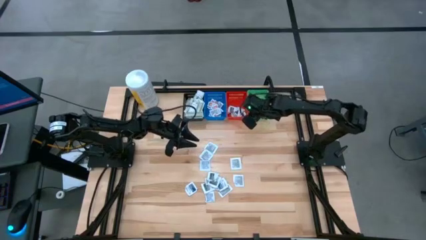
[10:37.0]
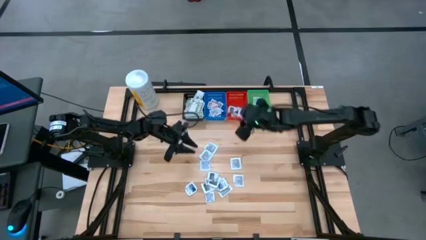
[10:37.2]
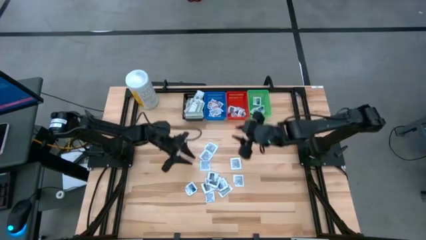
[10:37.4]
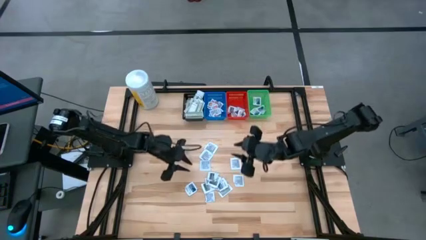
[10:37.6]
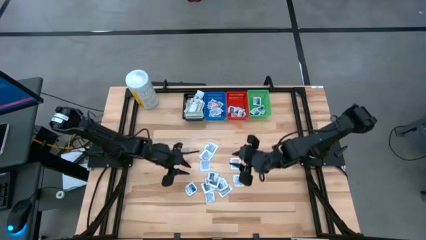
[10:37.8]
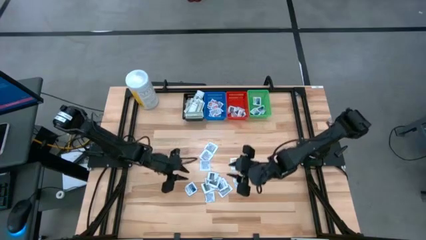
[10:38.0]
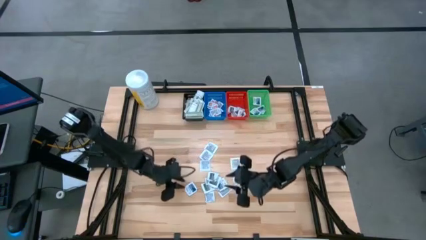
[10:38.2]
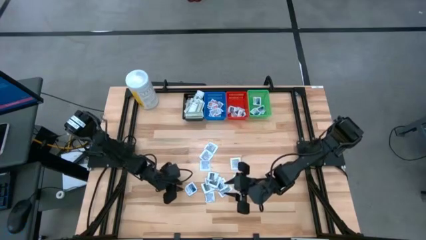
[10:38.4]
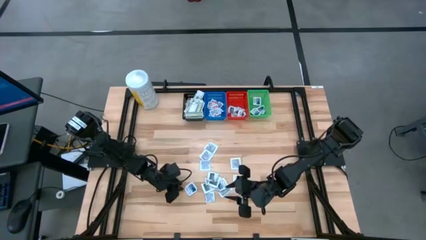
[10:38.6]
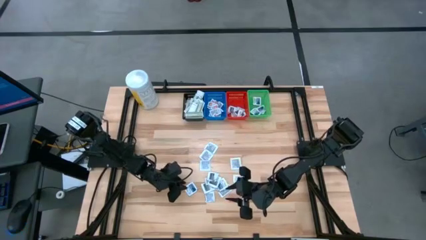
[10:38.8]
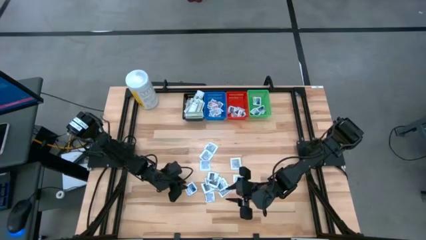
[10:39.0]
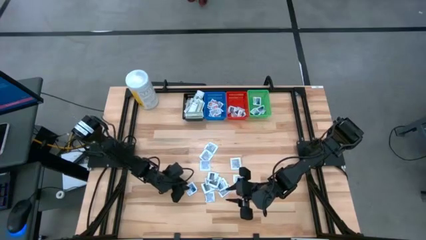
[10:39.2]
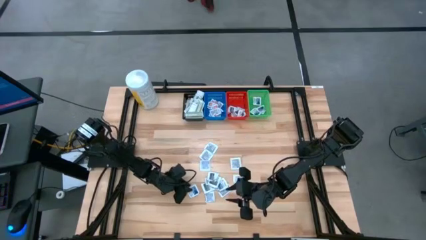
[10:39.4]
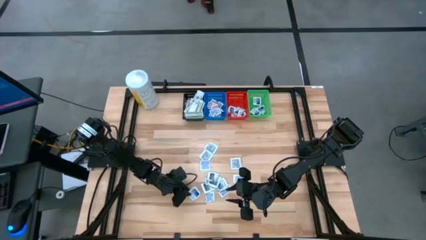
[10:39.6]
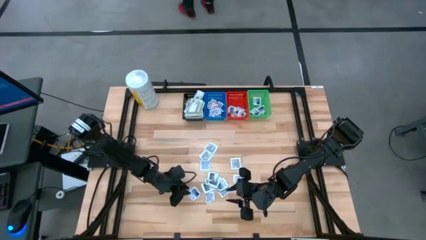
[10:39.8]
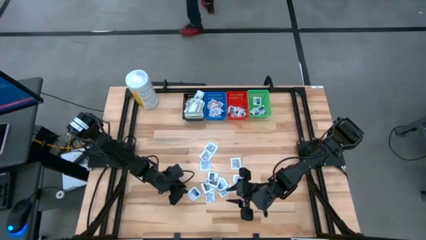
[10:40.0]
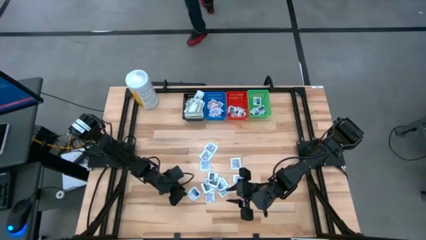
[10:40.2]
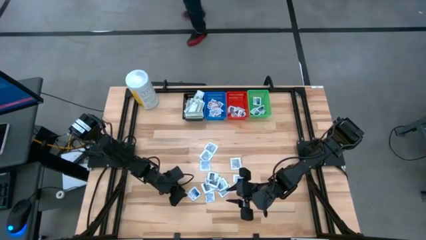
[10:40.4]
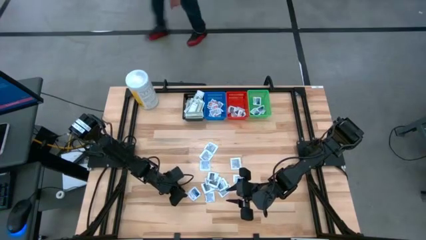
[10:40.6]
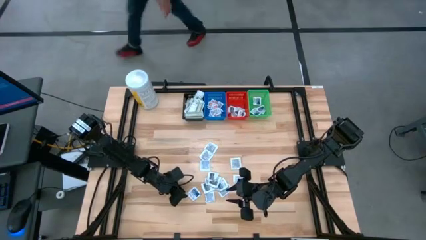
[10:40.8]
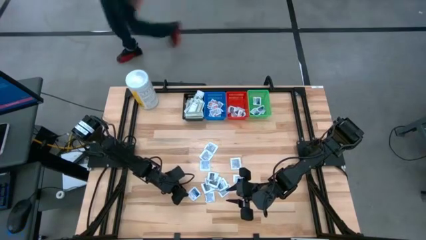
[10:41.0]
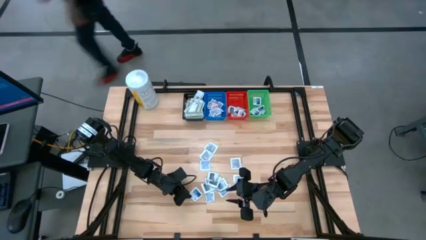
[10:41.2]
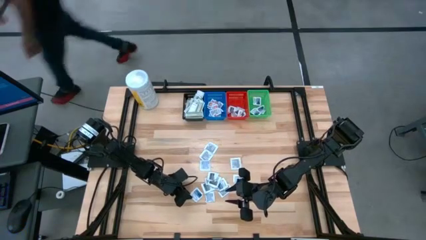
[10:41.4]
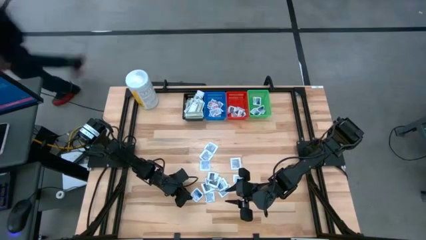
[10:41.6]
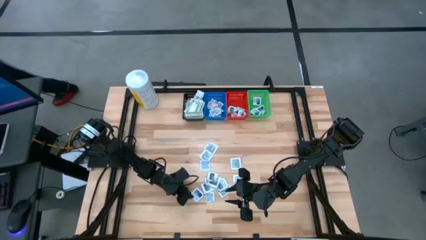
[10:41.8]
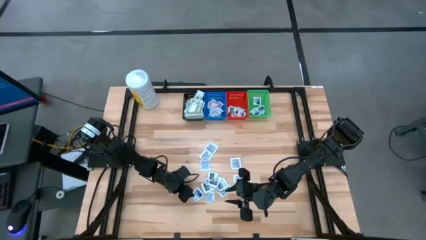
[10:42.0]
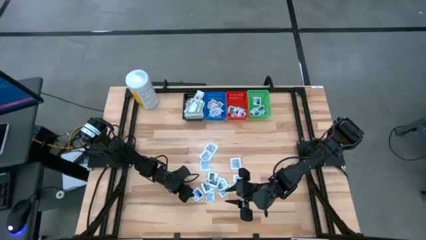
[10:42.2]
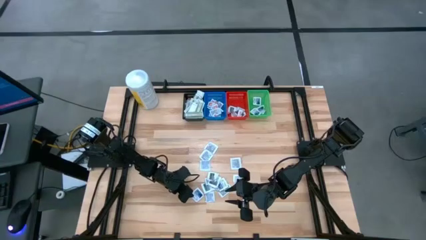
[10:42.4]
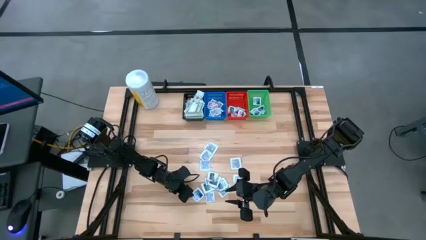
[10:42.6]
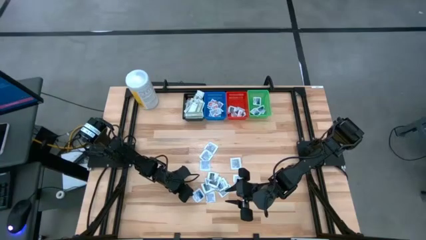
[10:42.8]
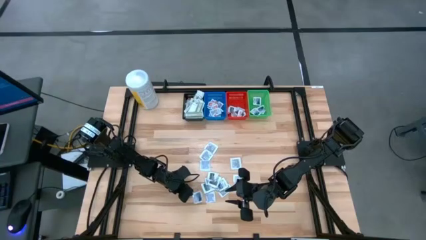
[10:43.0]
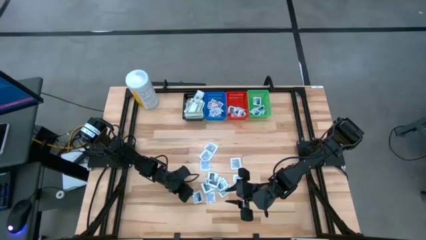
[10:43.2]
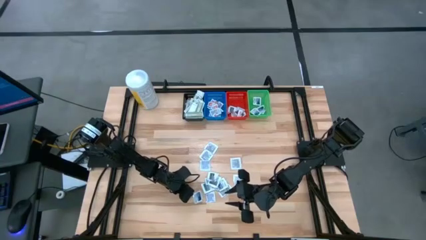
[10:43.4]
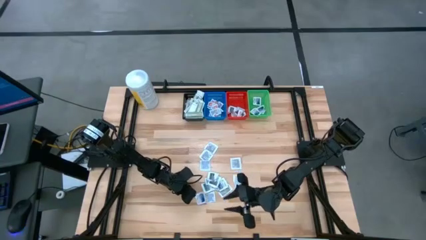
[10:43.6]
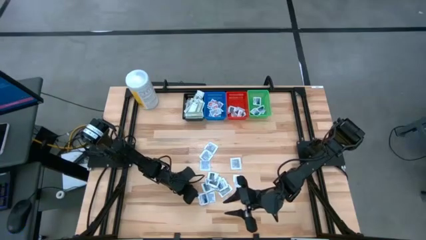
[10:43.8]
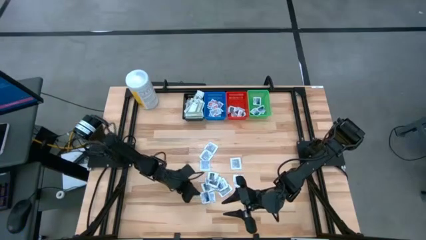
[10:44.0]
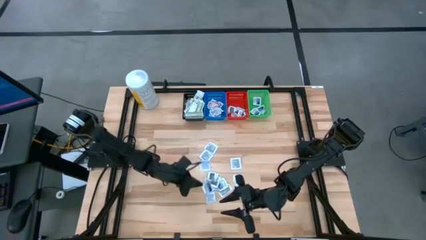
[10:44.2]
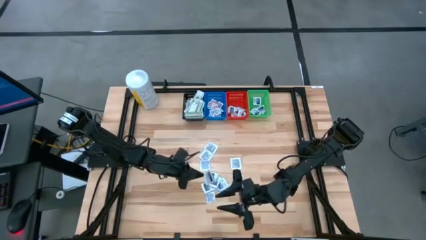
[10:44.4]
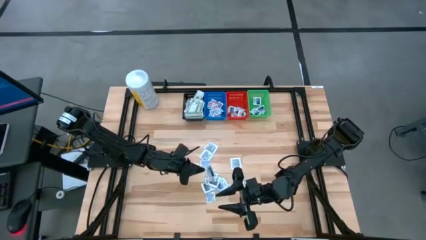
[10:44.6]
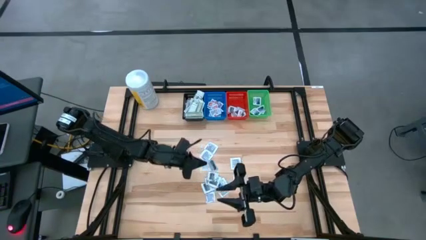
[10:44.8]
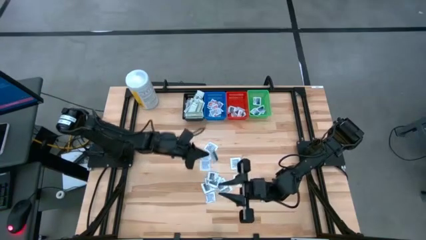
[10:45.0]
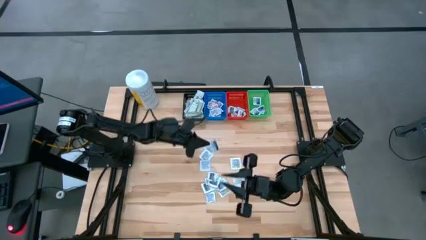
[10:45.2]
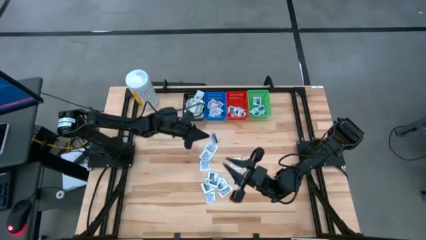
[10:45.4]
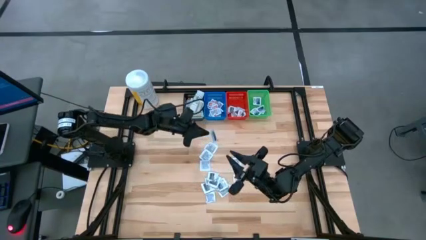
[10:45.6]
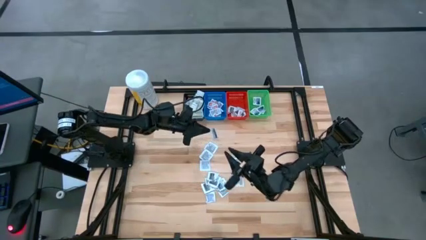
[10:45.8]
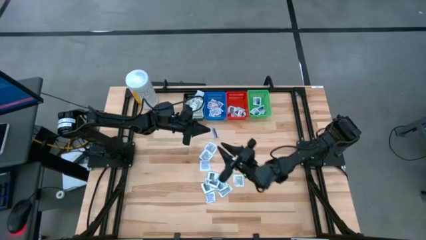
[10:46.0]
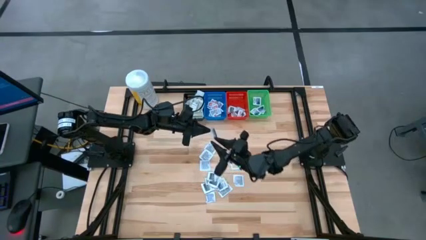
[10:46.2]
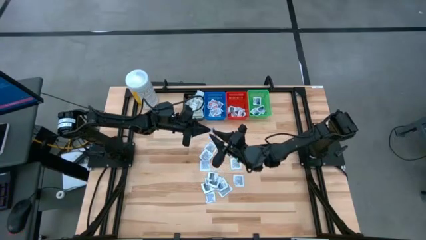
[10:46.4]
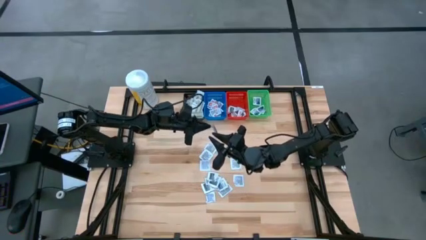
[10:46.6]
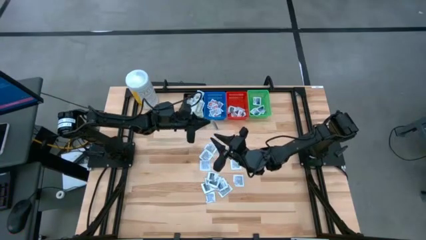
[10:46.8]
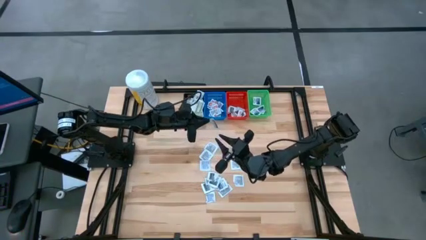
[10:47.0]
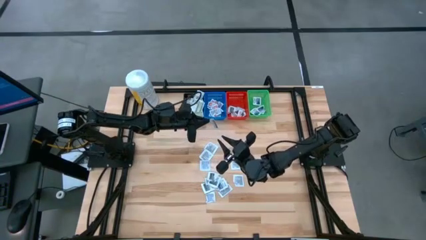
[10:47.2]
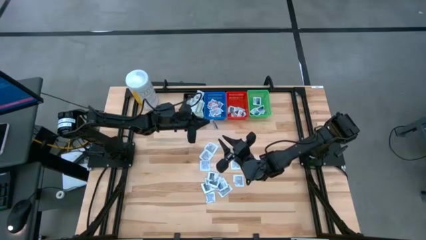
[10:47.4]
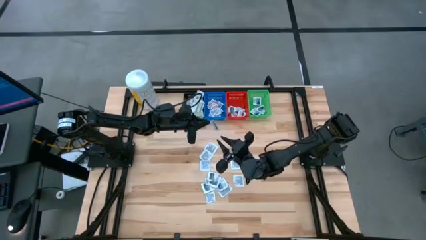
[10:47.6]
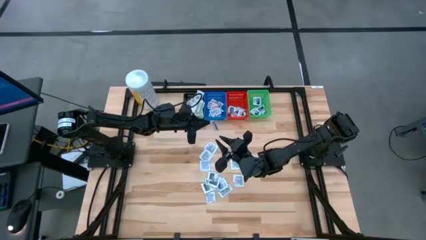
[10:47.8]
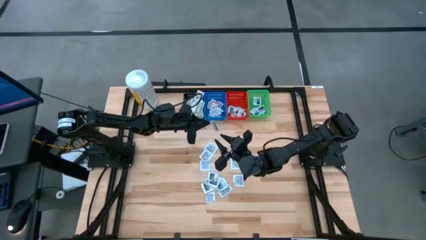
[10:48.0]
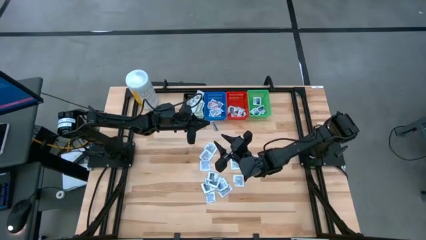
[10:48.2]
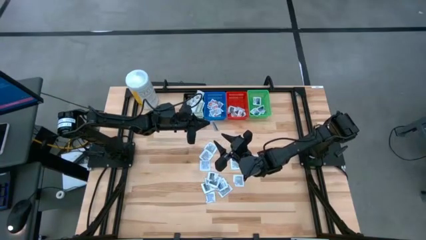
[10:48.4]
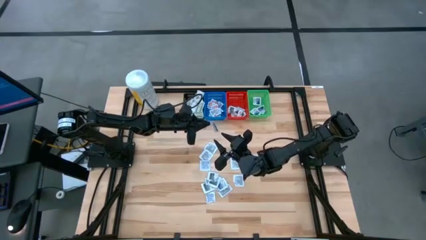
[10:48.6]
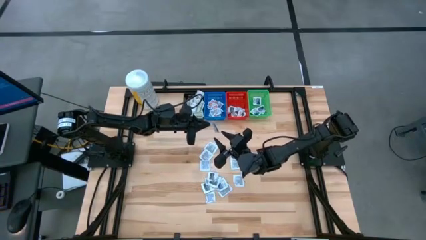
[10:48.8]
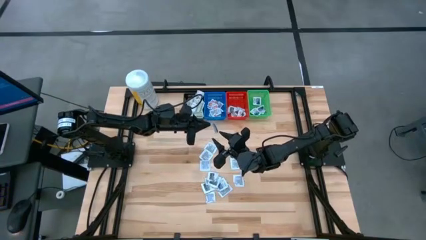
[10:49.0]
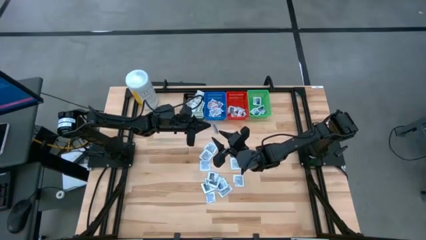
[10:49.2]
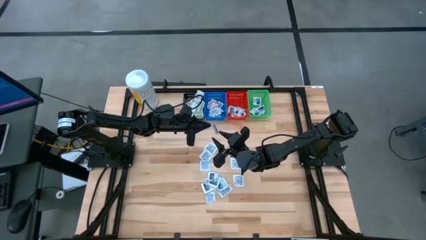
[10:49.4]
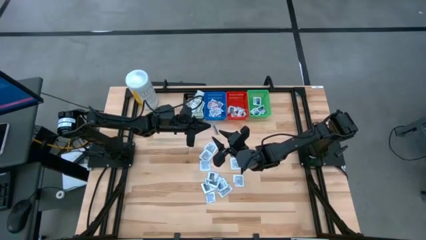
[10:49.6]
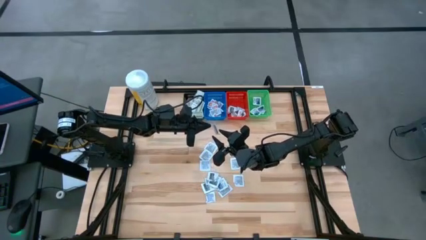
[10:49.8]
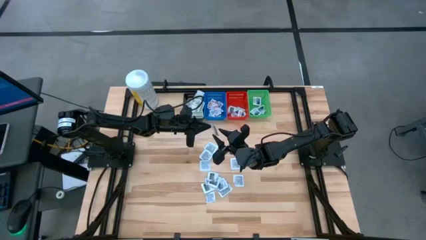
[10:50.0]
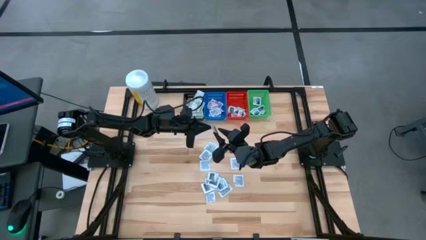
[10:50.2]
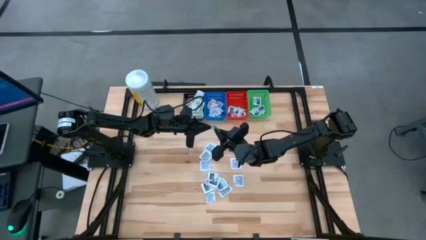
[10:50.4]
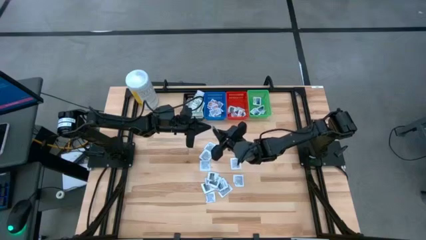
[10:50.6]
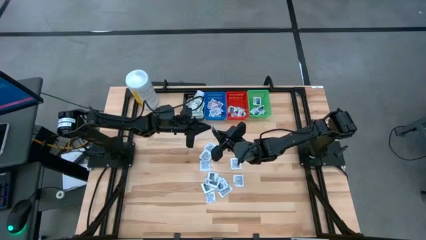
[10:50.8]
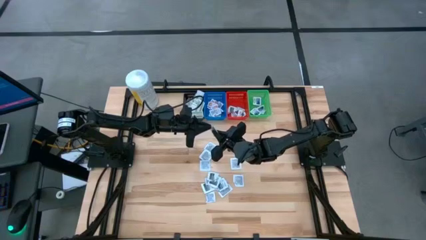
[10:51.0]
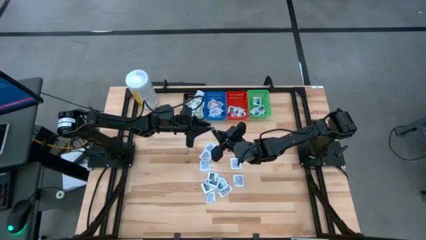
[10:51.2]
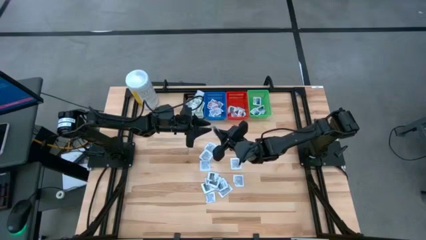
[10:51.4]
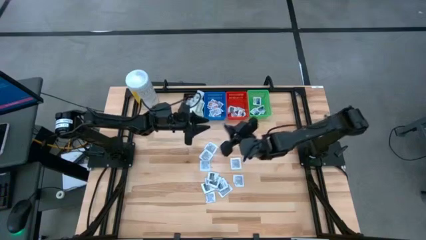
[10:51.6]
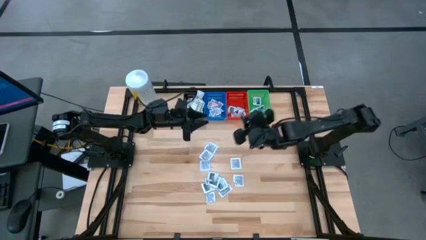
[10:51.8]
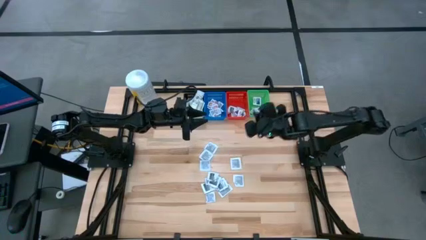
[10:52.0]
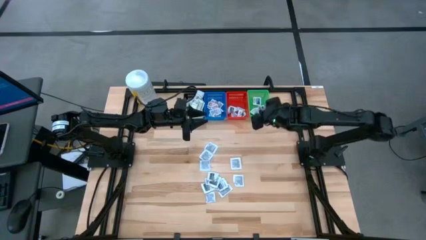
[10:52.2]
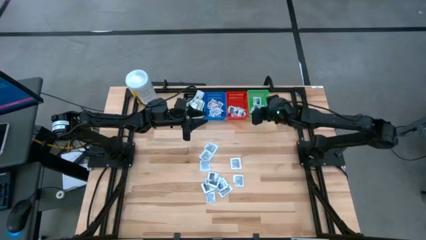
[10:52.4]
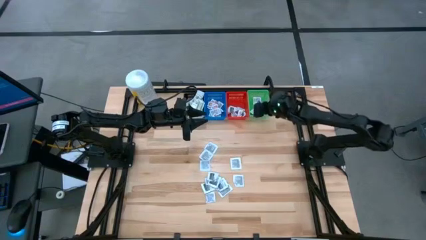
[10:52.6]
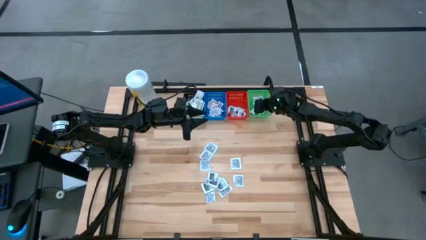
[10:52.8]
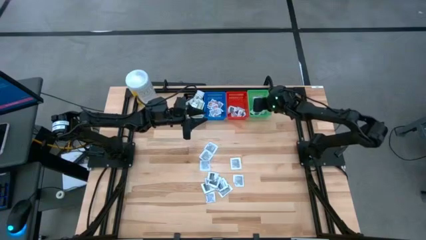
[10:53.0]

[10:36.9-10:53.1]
Task: Pick & Place First Aid Supplies
Put the blue alcohol pad in the green bin
